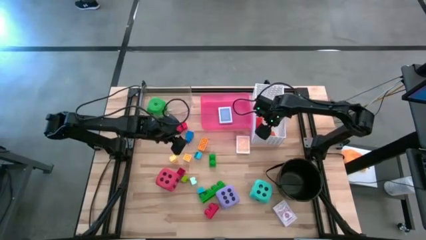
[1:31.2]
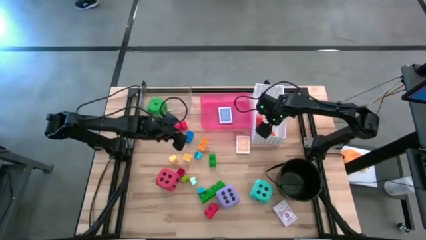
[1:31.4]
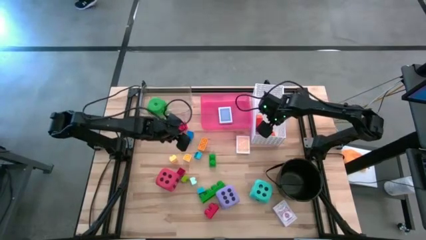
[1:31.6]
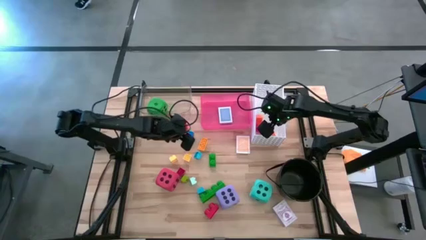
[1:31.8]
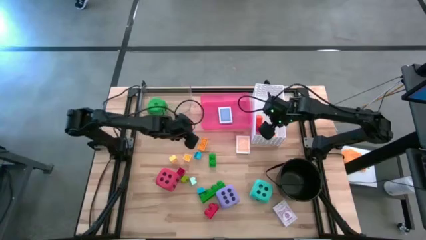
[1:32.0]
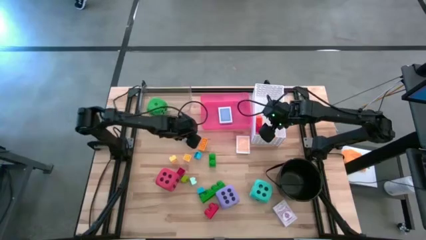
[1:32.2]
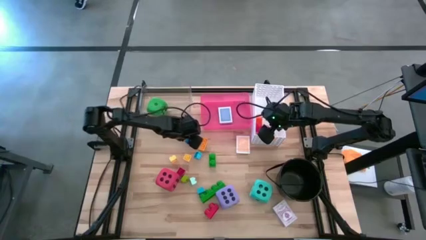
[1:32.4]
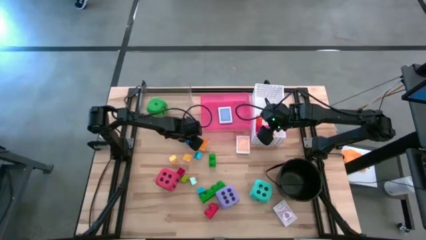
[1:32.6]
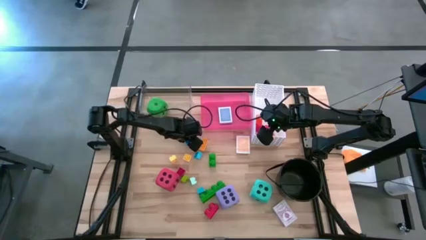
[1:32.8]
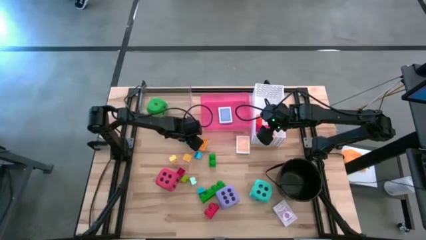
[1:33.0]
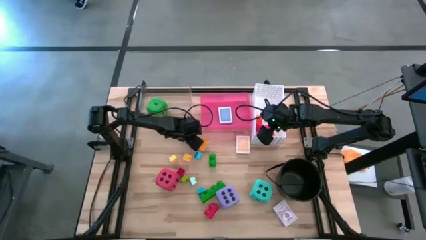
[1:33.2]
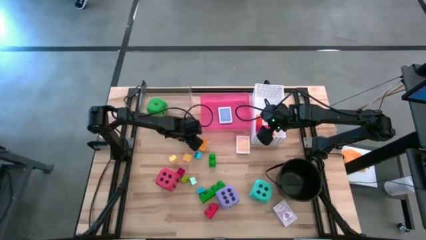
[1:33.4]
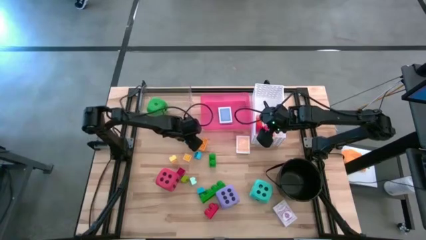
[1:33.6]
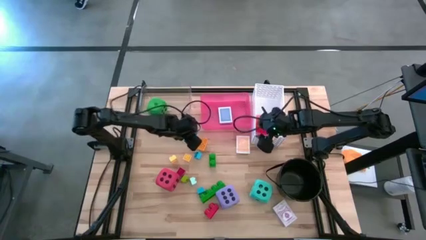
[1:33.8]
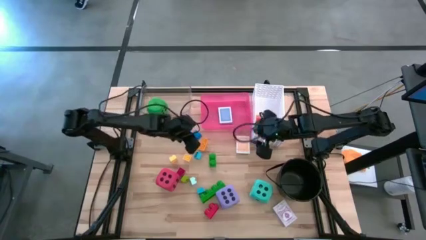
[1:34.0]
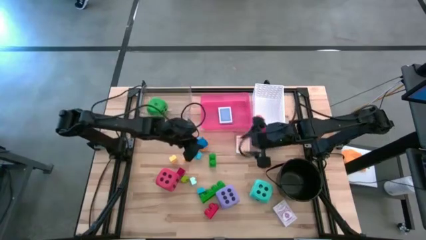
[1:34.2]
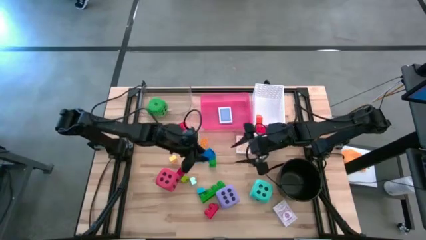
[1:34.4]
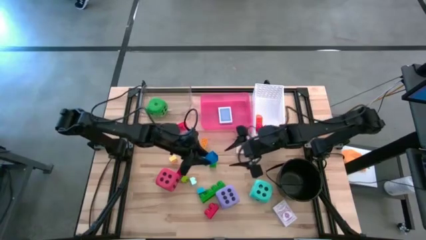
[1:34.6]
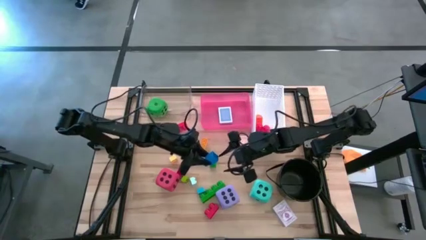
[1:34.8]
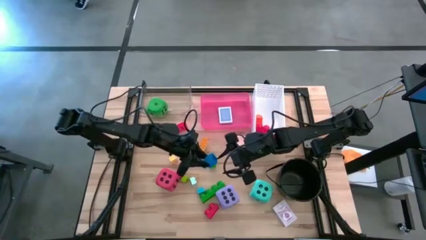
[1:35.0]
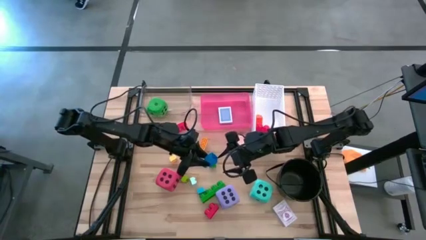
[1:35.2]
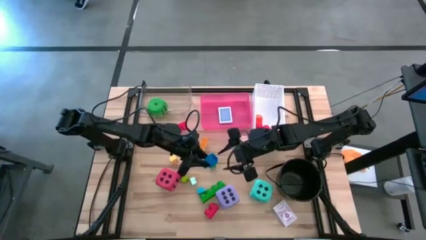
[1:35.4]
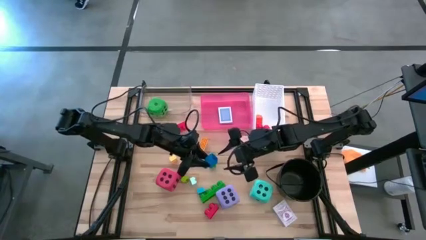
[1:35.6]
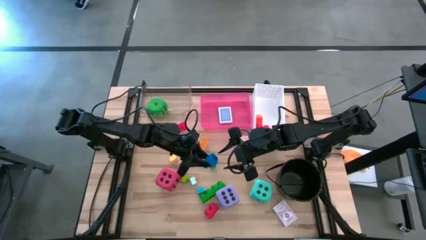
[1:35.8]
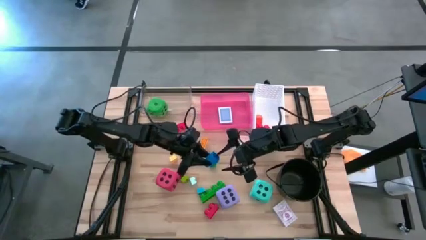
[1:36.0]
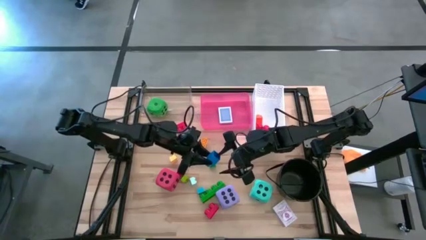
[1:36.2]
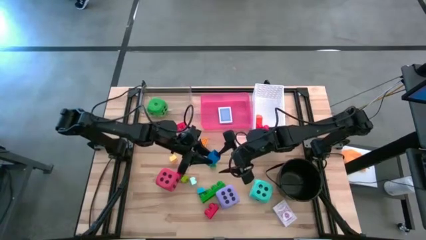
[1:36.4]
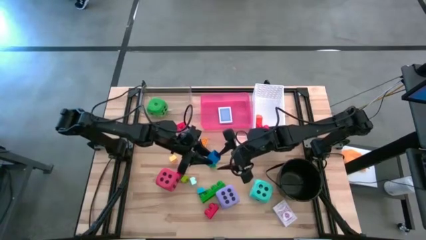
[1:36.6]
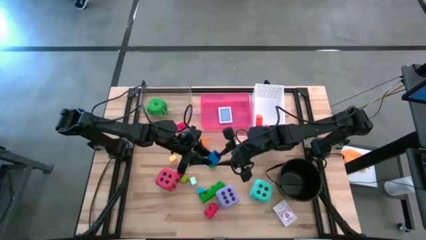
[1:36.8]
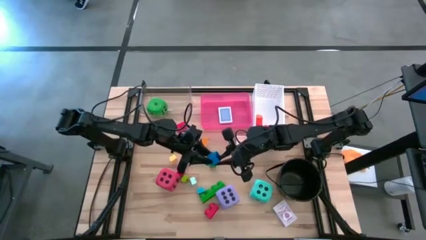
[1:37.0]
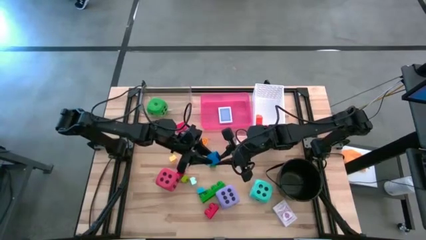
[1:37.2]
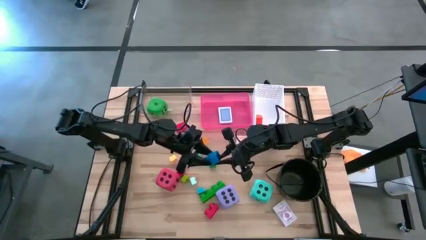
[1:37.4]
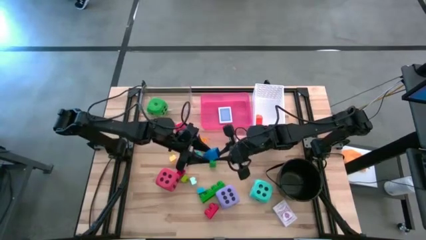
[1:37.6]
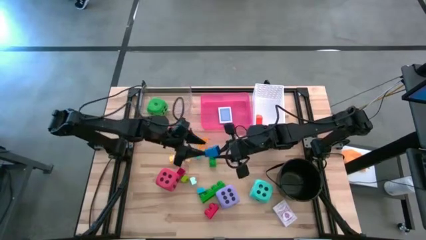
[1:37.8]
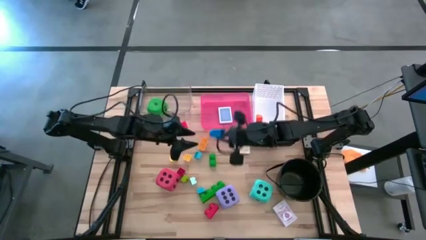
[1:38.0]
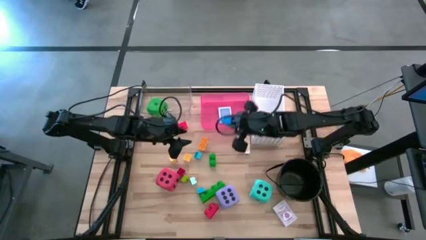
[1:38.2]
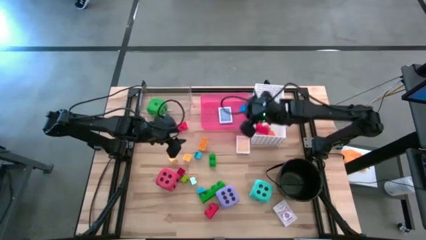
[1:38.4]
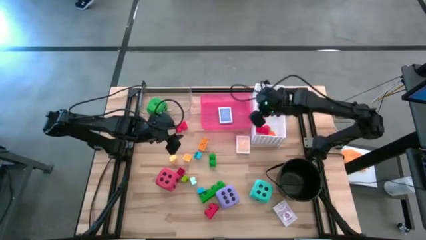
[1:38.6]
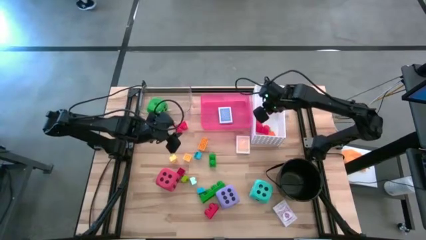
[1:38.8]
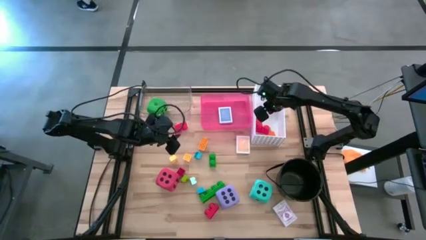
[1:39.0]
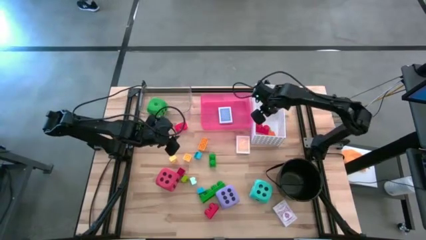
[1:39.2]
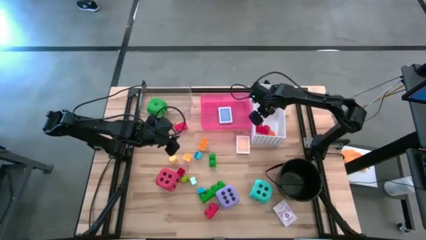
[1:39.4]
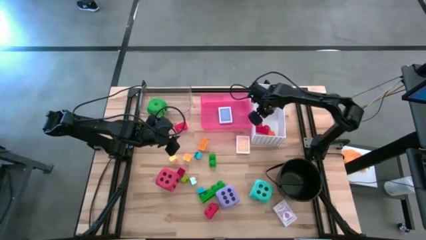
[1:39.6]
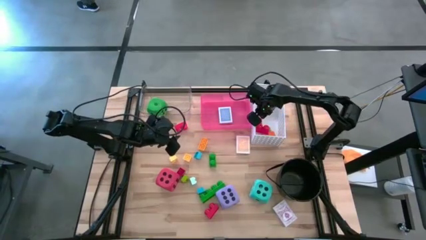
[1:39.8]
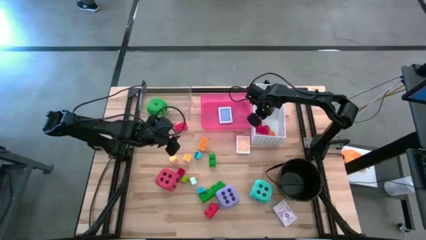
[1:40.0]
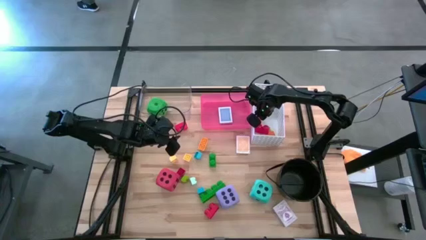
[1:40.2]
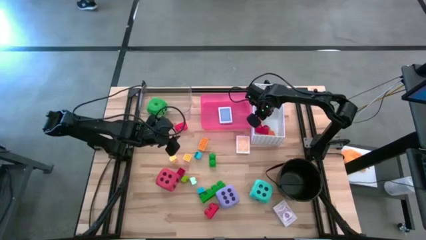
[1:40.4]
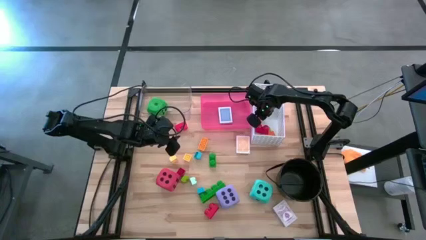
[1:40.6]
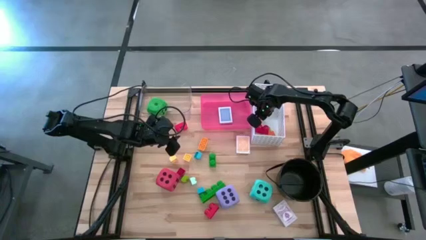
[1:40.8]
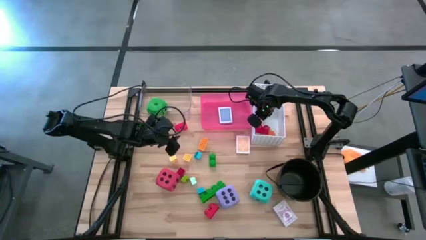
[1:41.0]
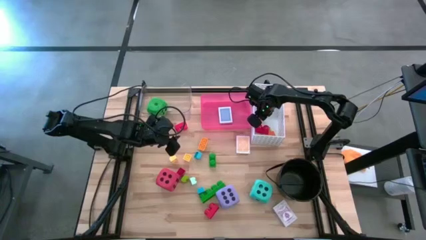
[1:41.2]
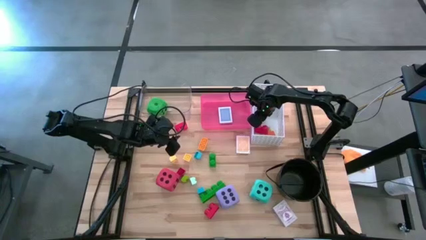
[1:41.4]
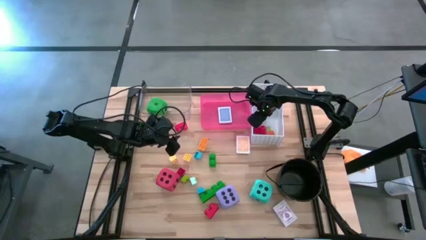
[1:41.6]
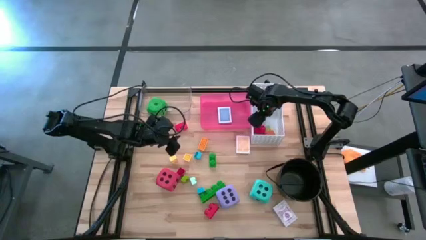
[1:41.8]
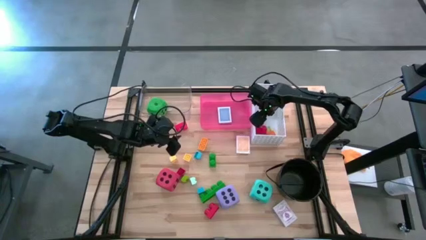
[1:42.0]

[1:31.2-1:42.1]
Task: Pick & Place Toys
Put the large blue game piece into the white bin

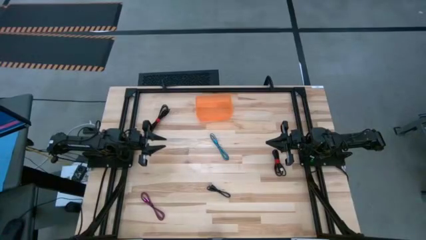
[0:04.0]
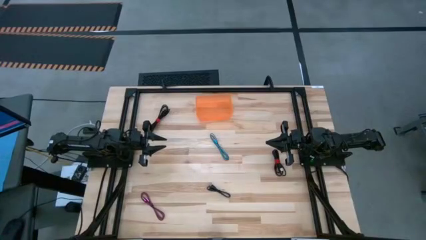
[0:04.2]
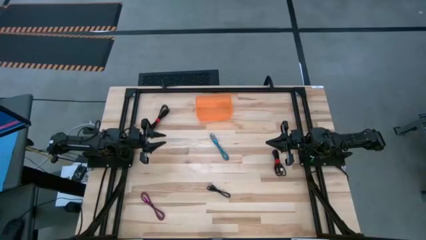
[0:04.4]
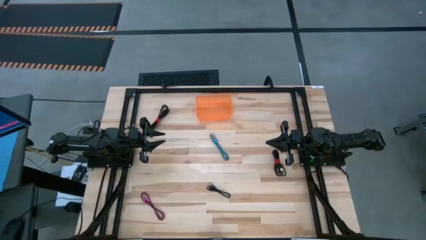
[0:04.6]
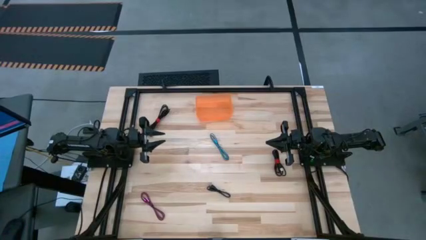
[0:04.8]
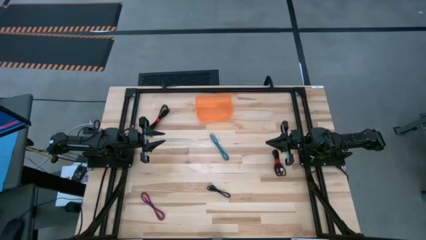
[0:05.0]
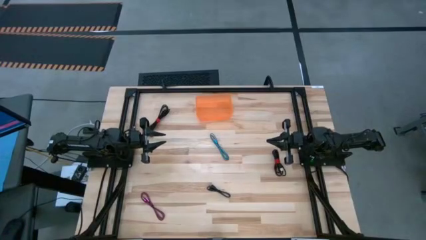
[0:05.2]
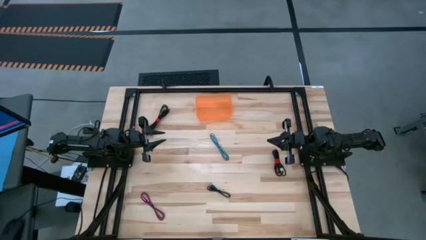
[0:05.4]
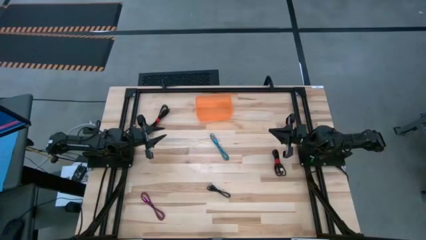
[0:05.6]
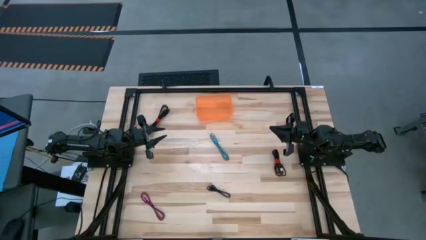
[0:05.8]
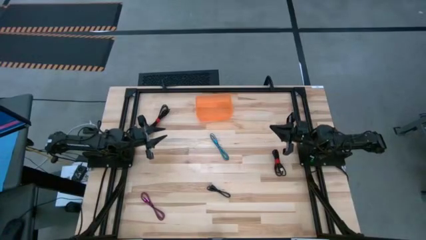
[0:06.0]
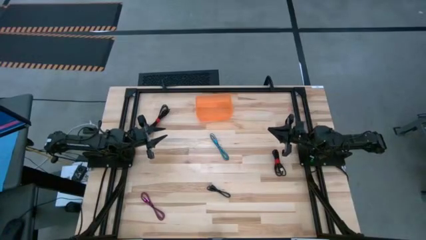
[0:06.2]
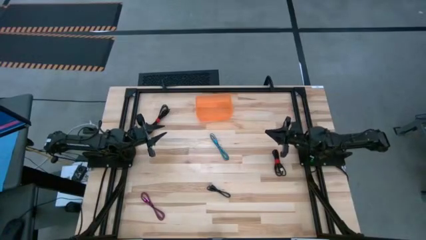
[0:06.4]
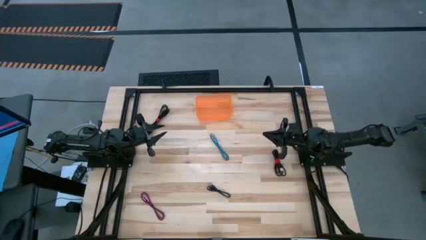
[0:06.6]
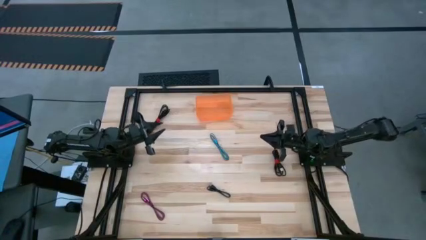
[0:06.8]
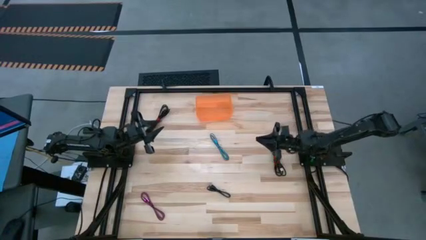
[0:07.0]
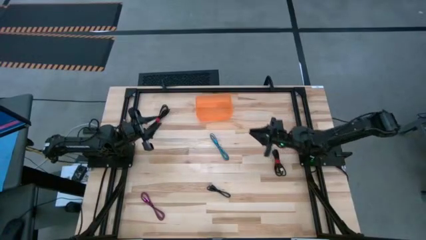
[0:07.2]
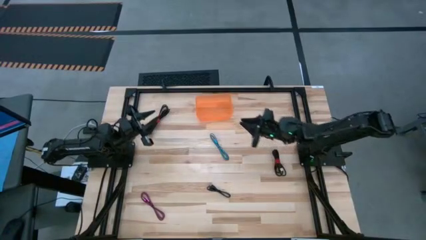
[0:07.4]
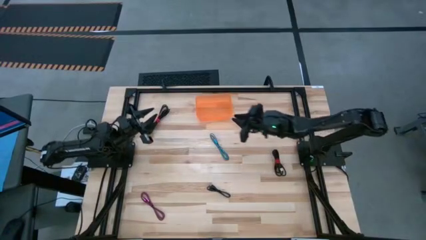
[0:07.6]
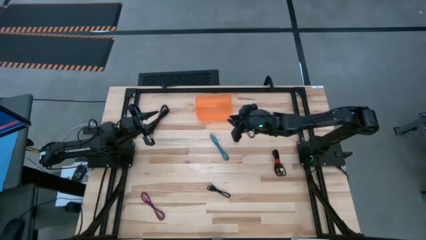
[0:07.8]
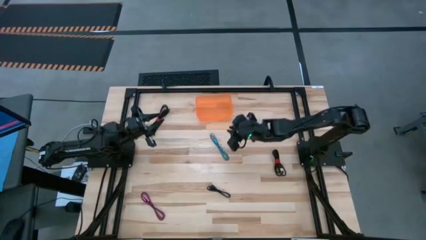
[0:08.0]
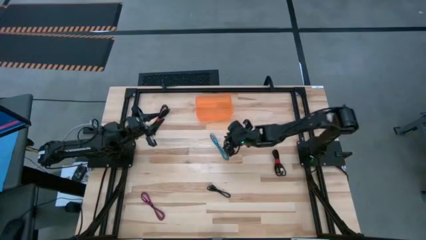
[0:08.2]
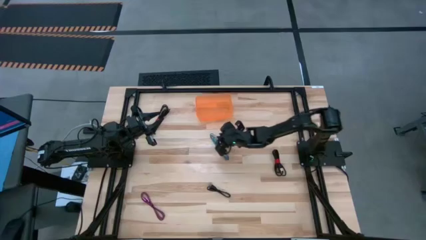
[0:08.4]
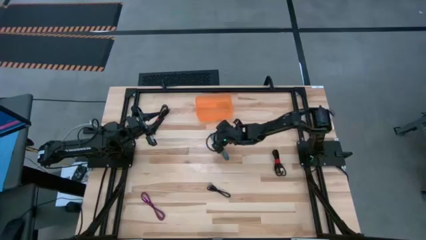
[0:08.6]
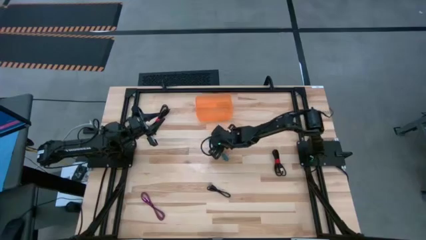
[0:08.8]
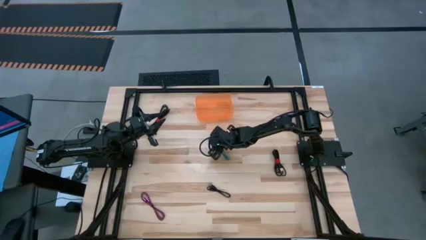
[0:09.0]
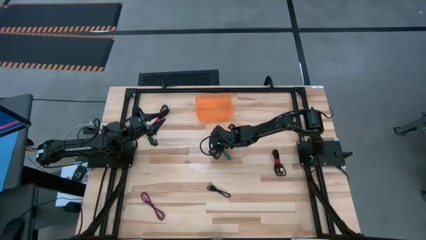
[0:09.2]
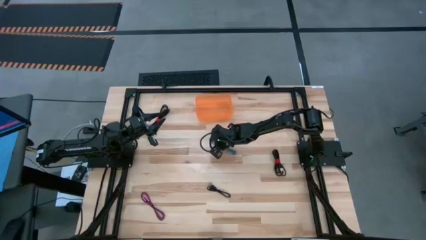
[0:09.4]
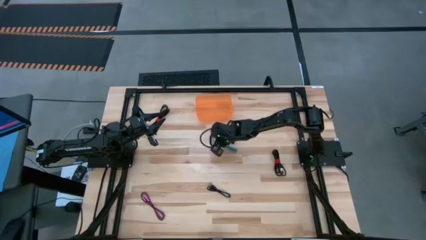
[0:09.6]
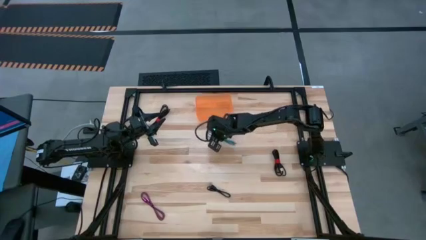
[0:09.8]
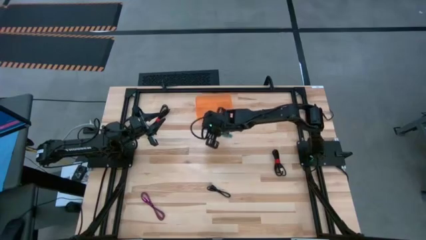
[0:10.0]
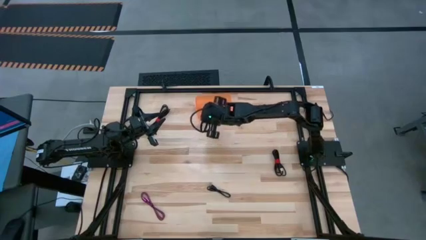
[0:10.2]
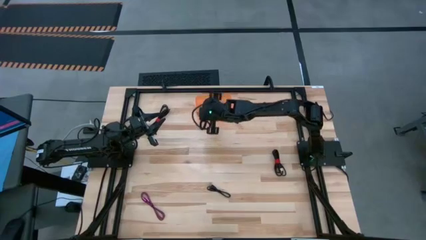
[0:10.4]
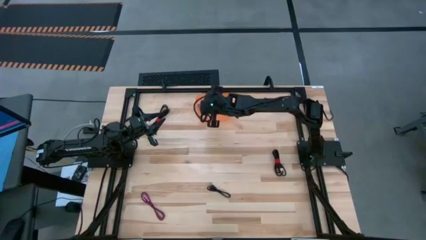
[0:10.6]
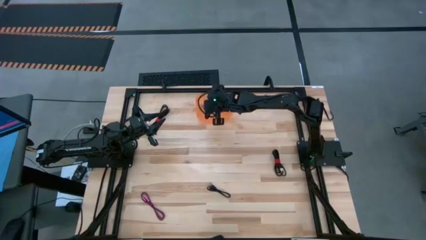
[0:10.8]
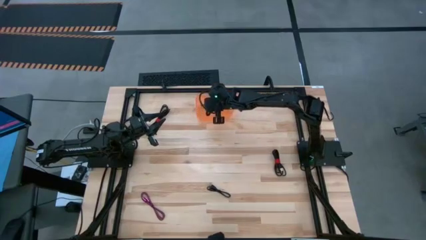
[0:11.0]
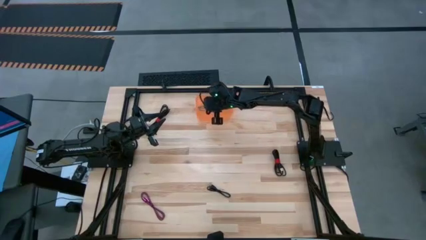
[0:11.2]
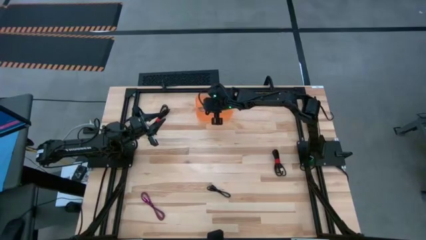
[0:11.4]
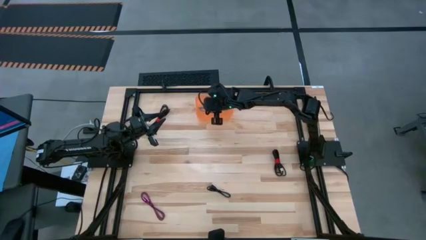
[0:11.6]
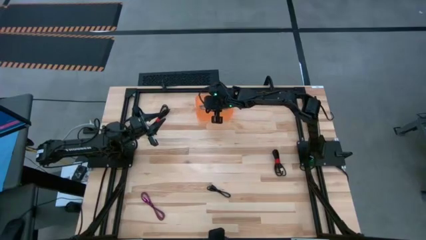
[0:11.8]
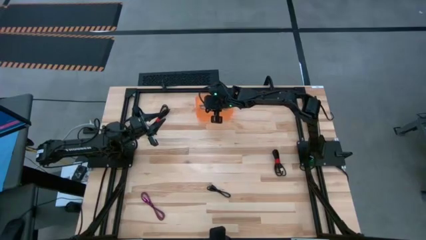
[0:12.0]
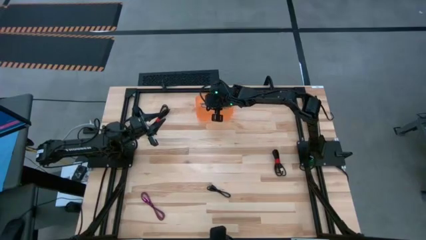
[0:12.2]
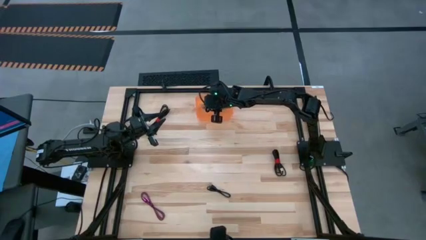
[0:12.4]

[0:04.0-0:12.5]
Task: Pick and place USB-C Cables
Put the blue charger cable into the orange bin
